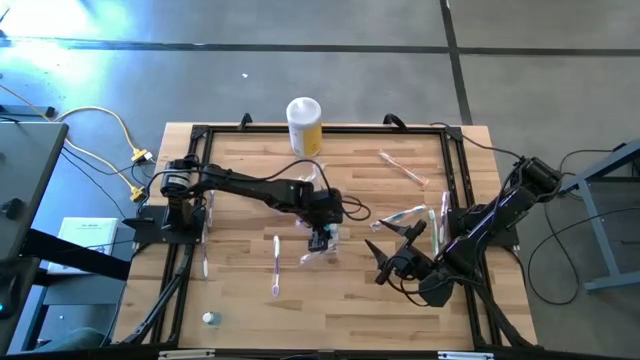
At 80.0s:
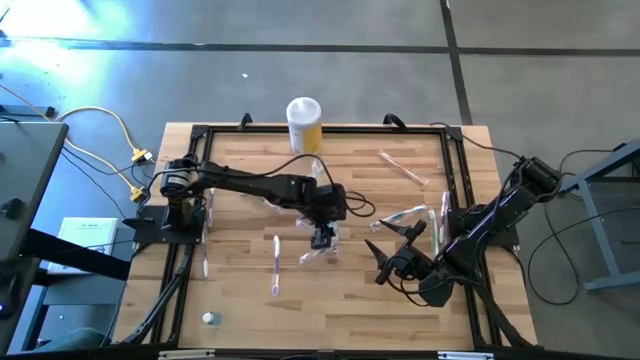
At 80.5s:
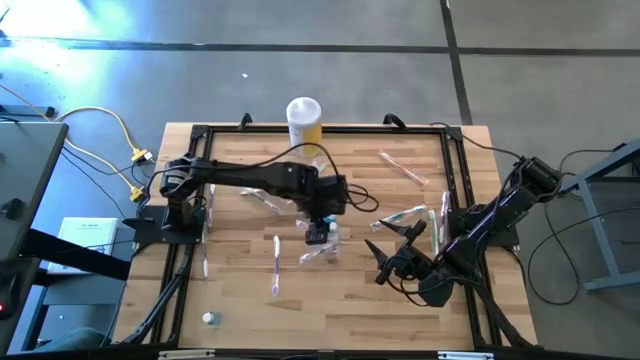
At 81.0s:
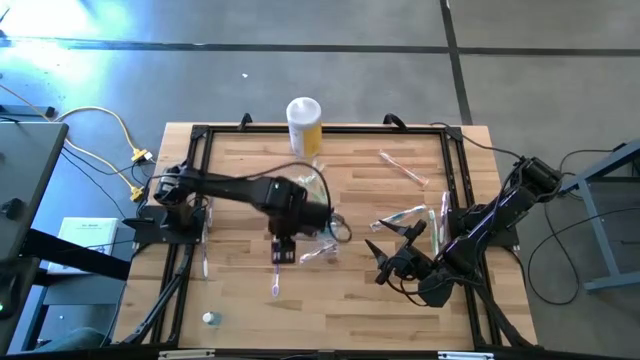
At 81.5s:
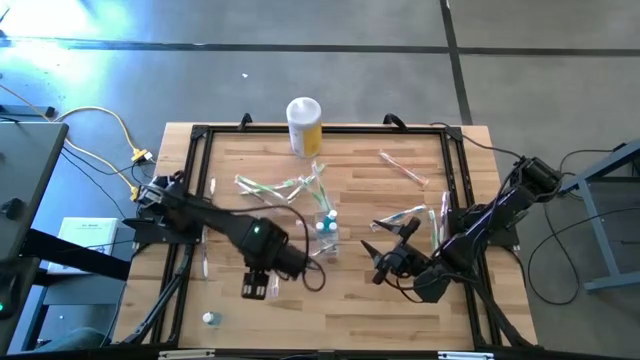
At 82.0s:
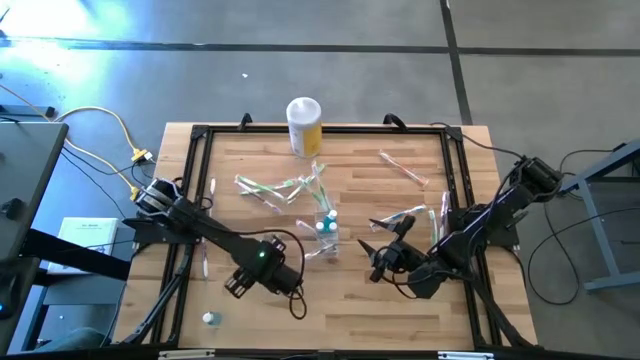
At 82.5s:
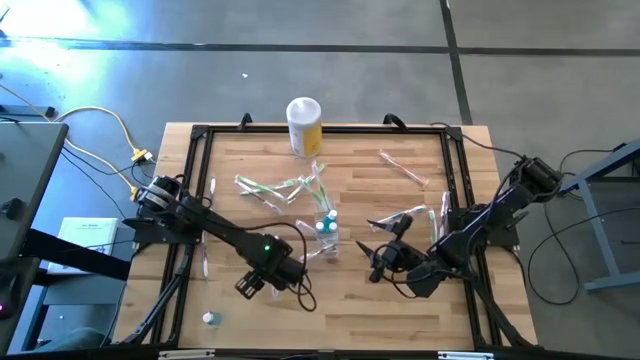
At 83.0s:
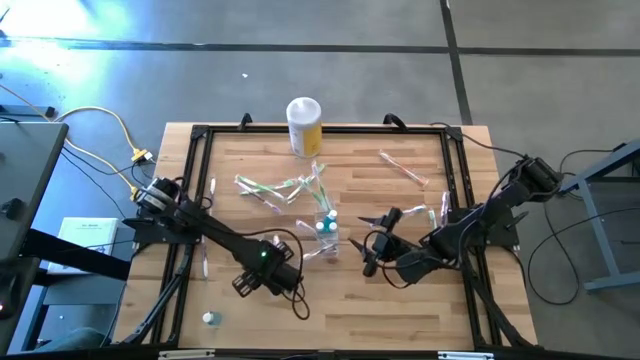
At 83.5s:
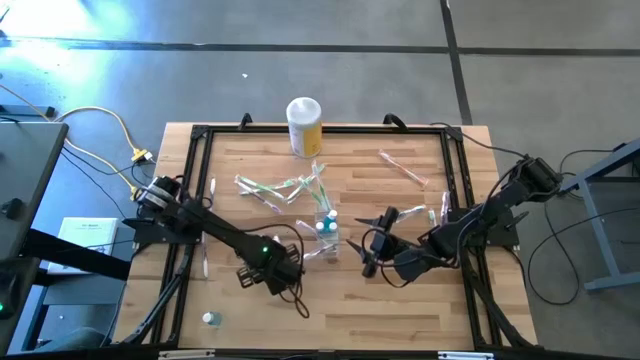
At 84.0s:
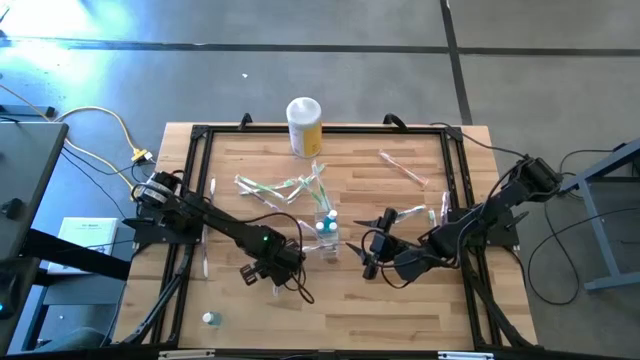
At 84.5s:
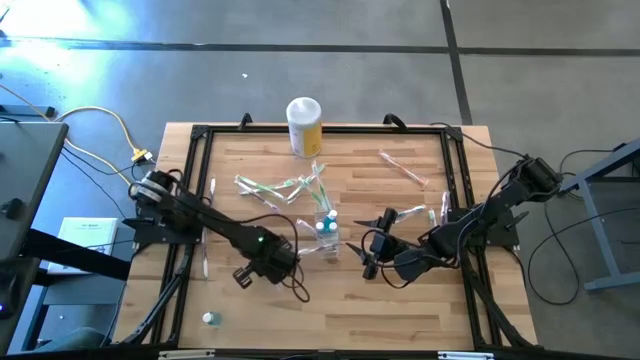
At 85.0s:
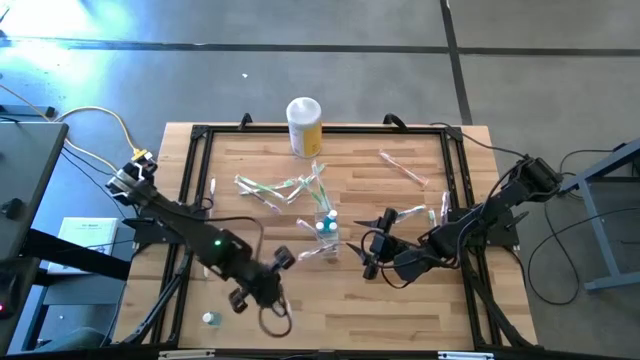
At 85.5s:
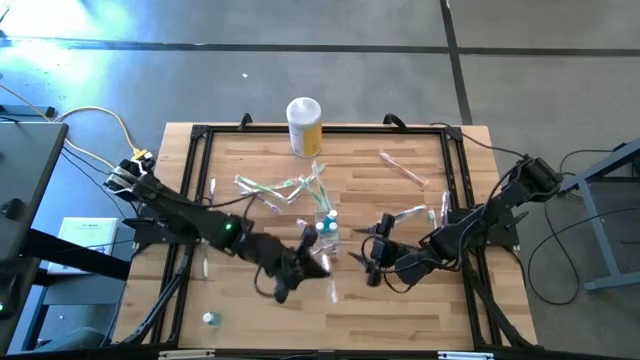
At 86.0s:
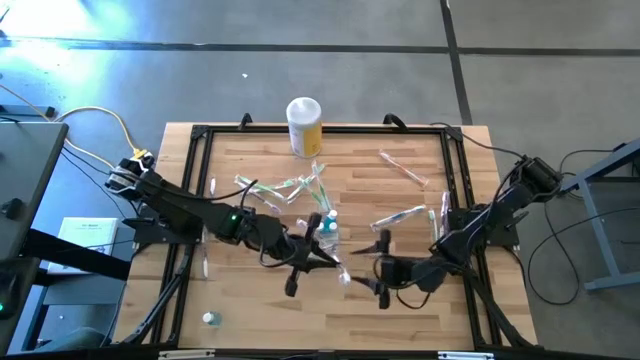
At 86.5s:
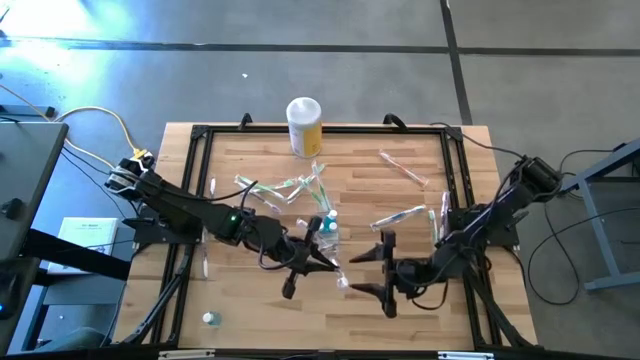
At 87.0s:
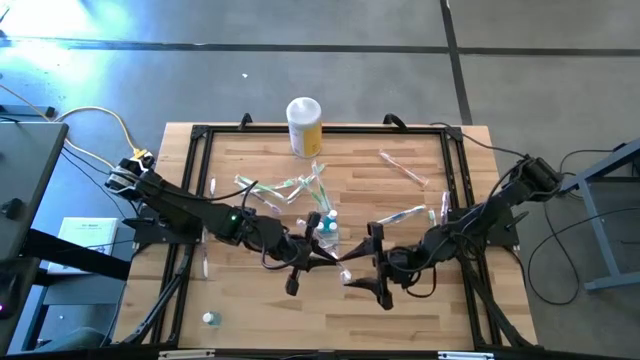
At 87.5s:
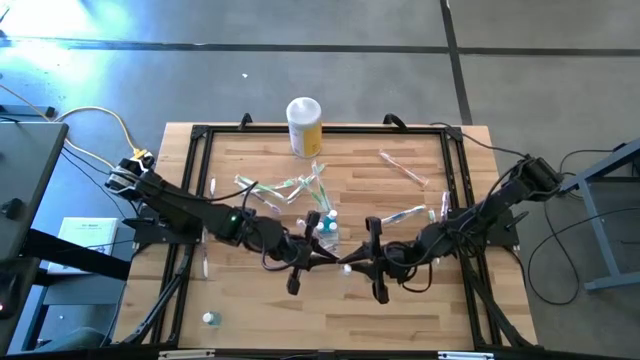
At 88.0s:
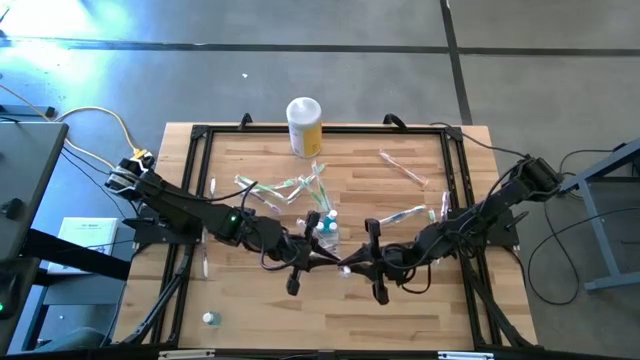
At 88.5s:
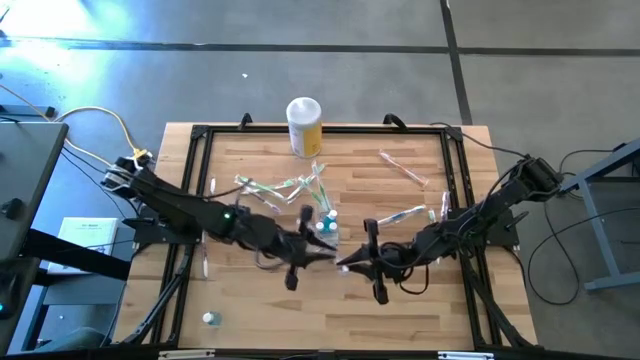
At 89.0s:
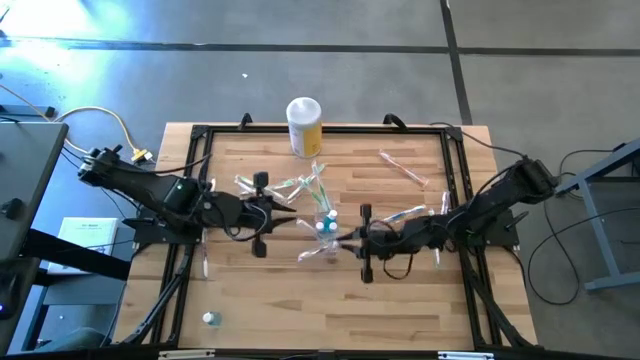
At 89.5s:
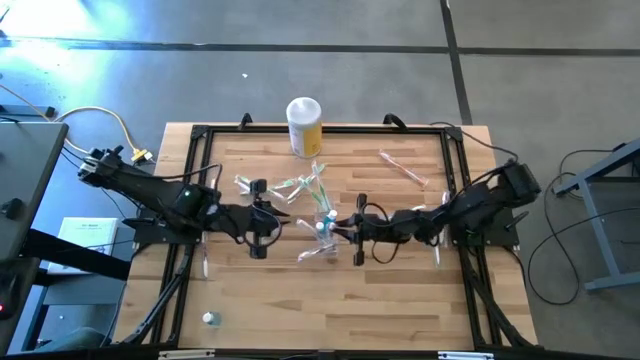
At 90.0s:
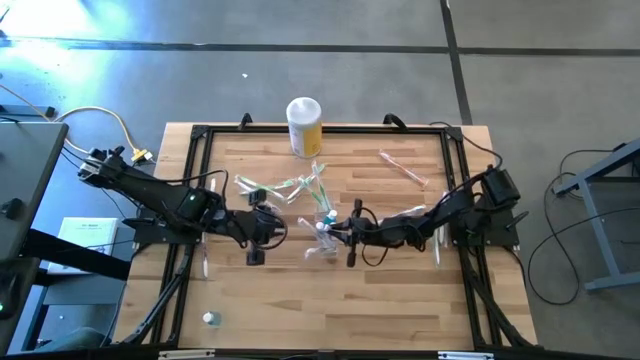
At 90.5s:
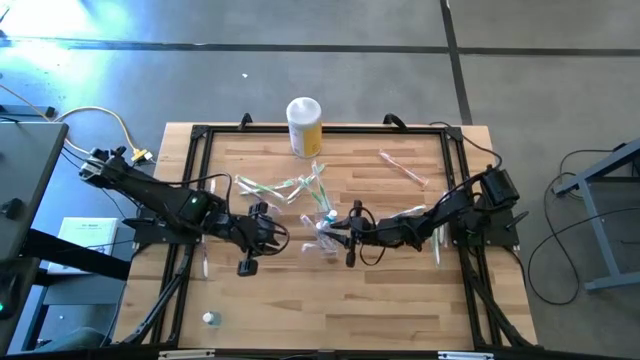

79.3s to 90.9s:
Task: Pick & Place toothbrushing station
Put the purple toothbrush into the transparent organizer

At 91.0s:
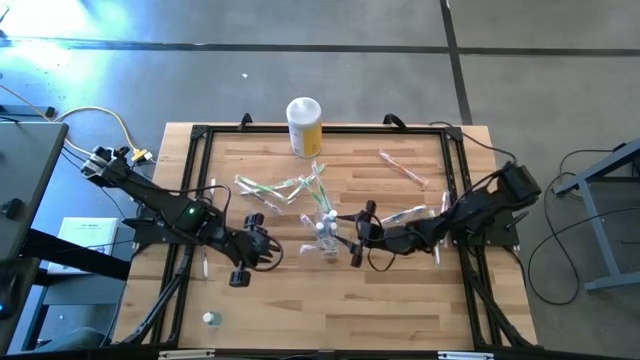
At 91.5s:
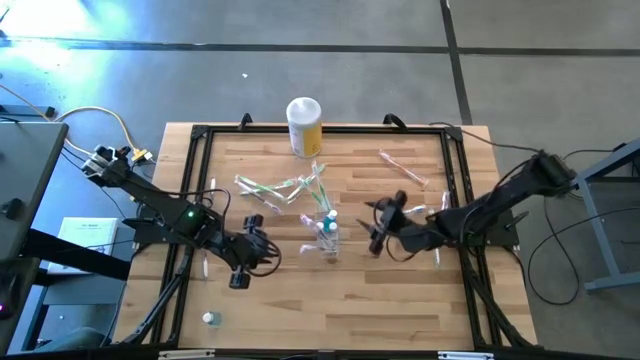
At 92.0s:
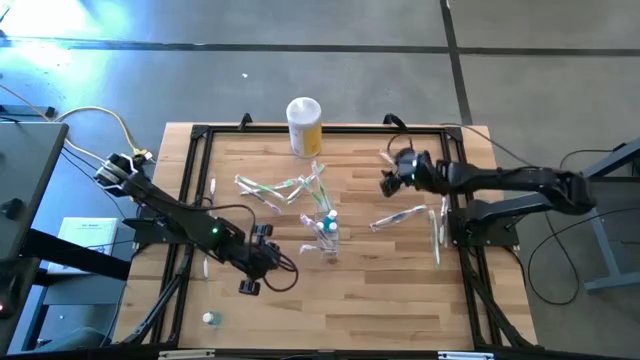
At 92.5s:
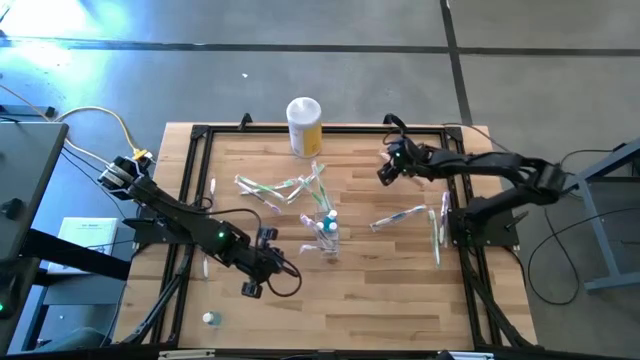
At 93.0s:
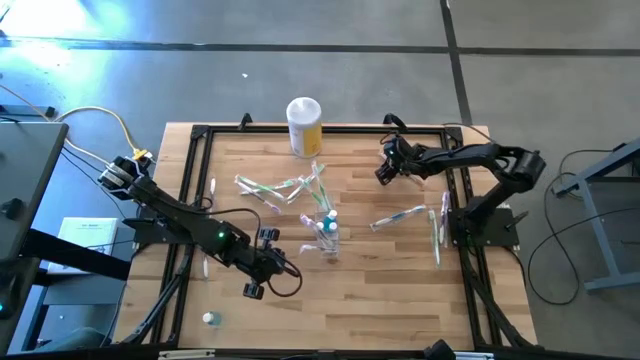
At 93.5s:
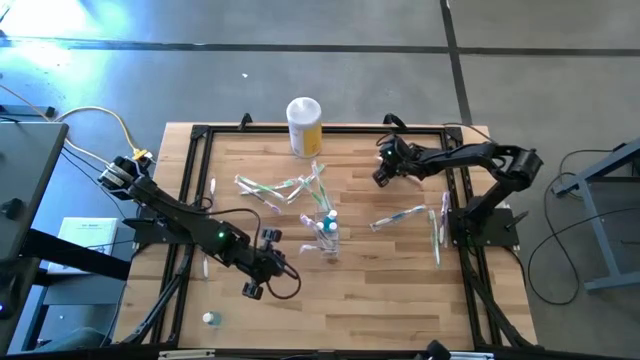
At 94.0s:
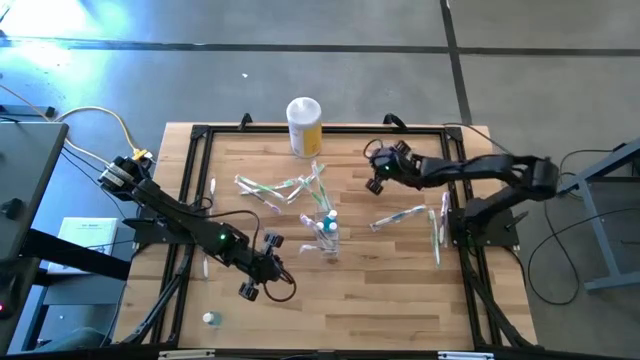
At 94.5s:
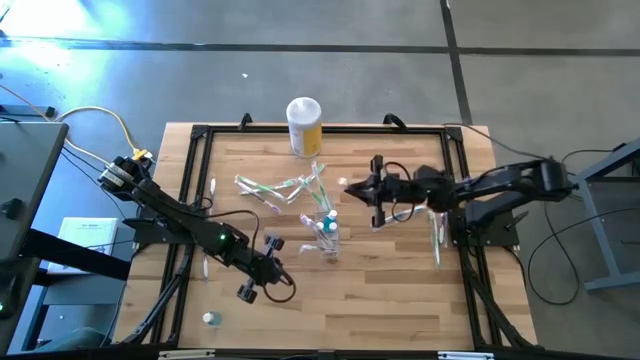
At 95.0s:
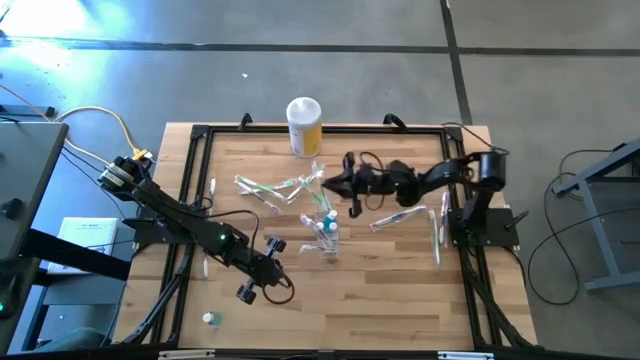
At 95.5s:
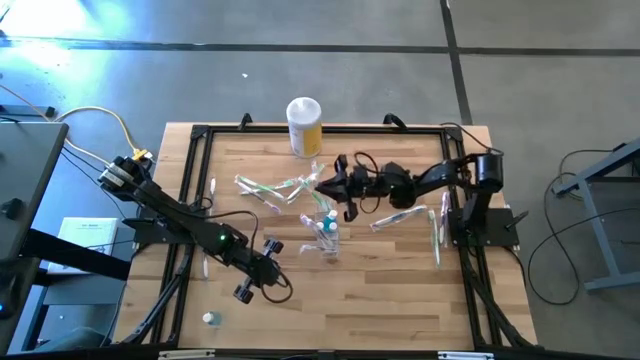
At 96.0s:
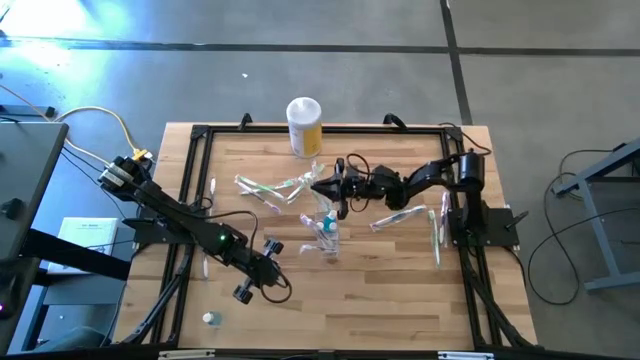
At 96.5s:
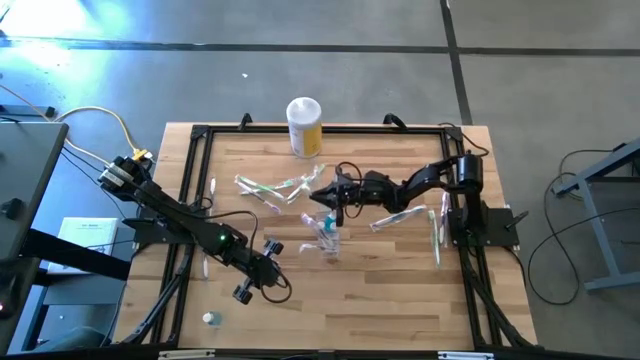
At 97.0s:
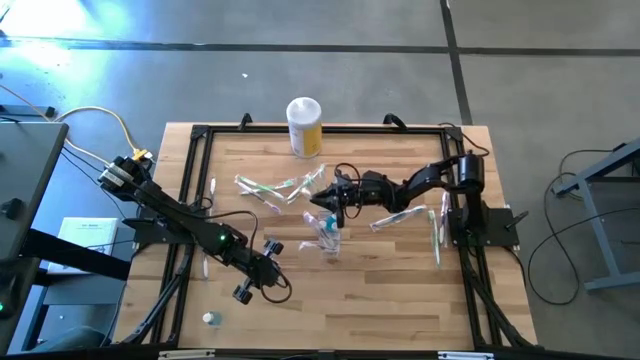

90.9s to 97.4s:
Put the orange toothbrush into the transparent organizer

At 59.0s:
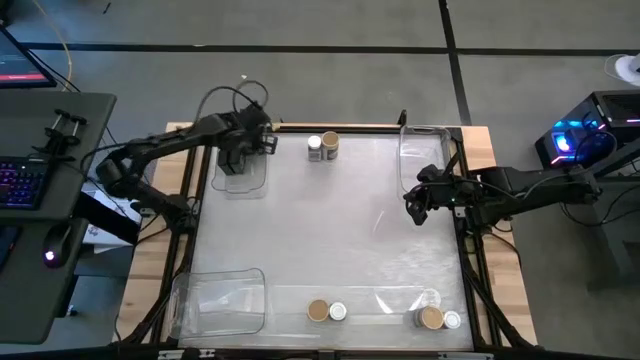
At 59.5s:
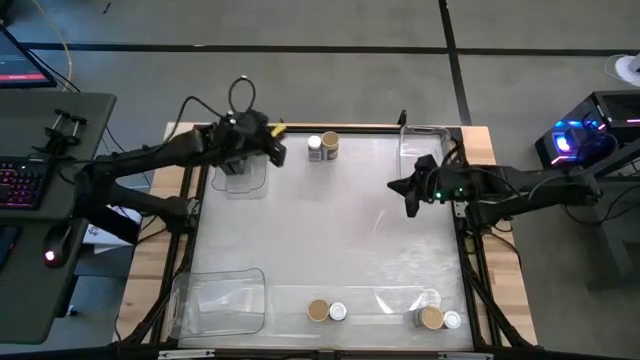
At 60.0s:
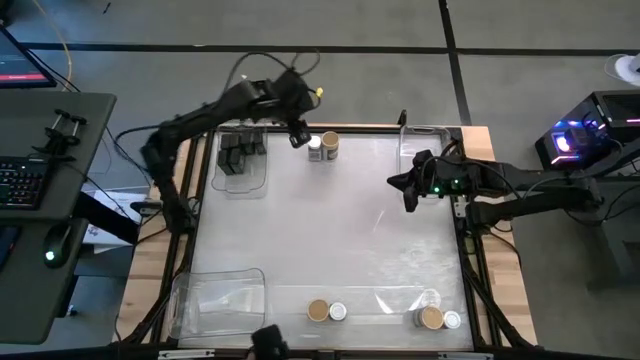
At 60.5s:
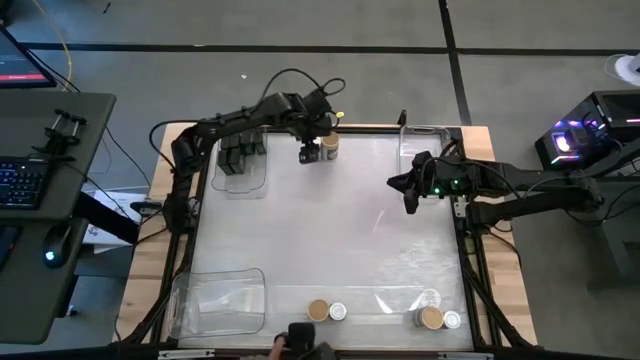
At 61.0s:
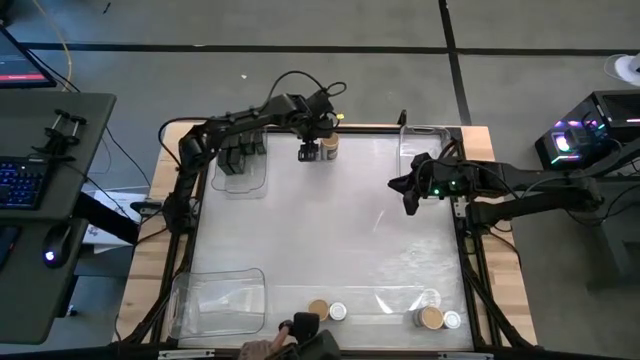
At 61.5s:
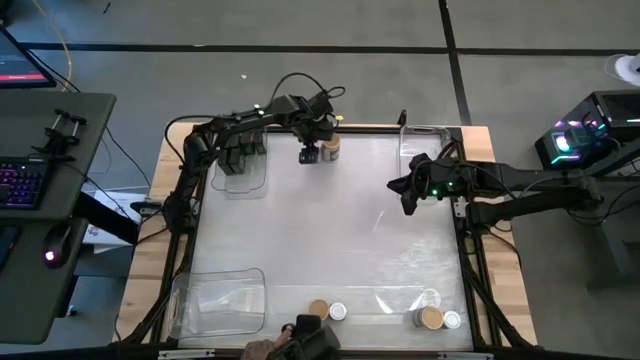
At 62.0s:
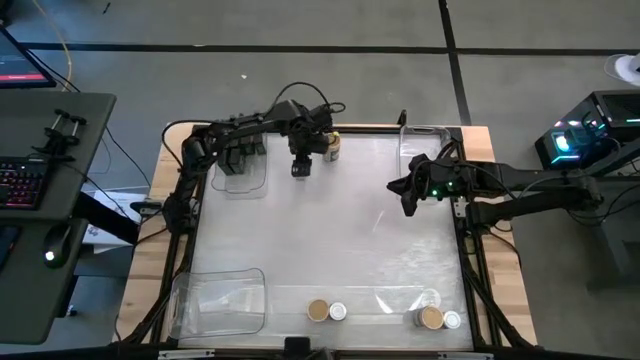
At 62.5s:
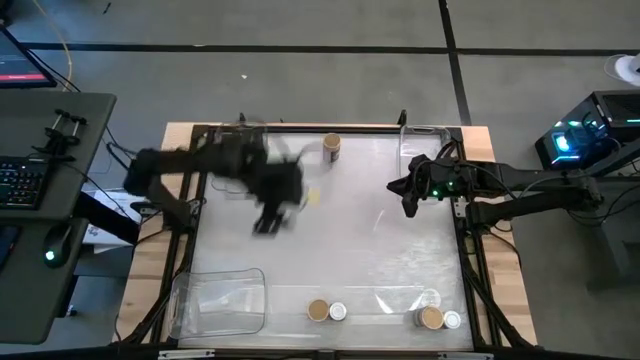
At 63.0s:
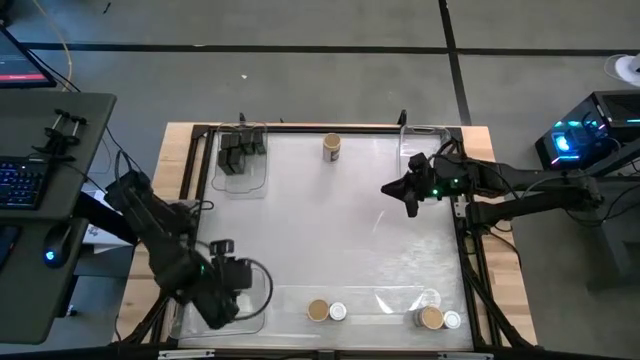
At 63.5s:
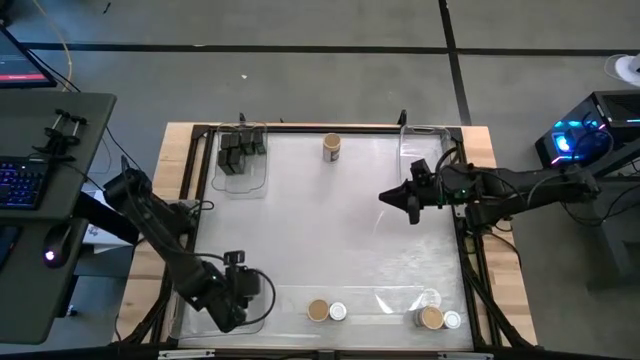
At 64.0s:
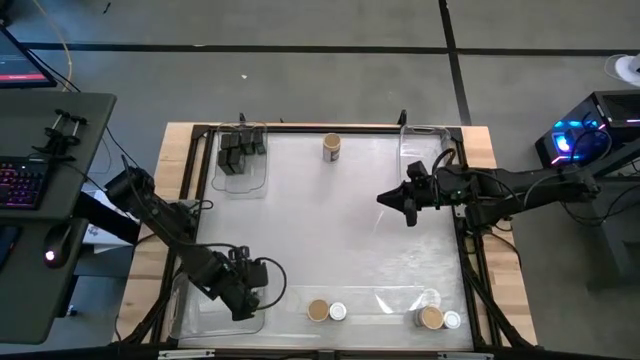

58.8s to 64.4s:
Task: Sort spices by type
Put the top white seasoning bottle into the bottom transparent bin
